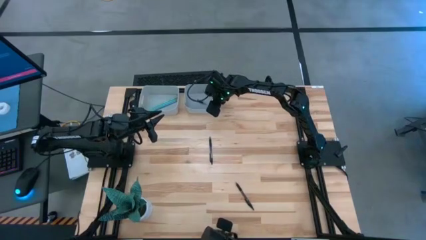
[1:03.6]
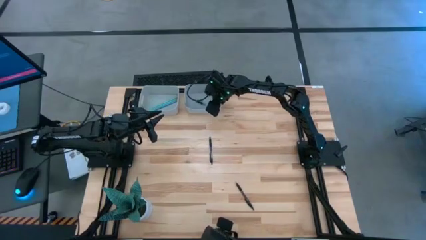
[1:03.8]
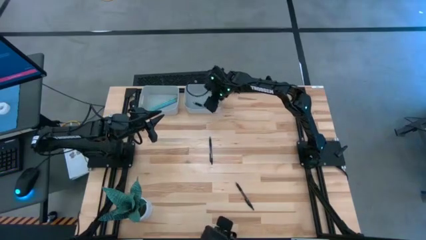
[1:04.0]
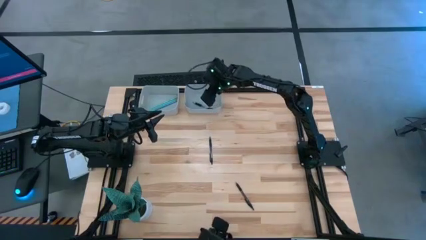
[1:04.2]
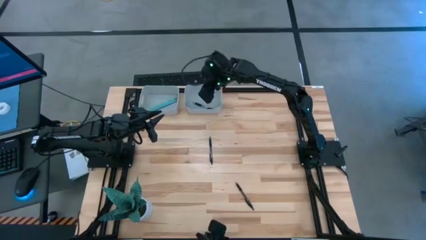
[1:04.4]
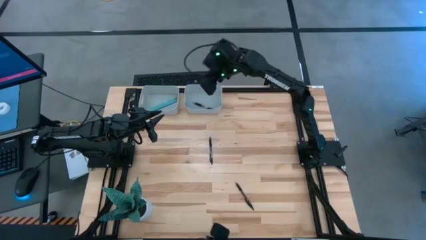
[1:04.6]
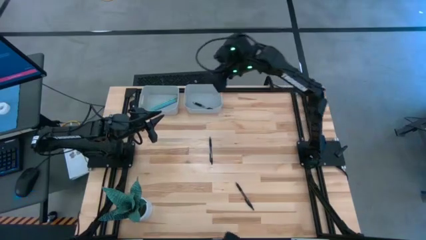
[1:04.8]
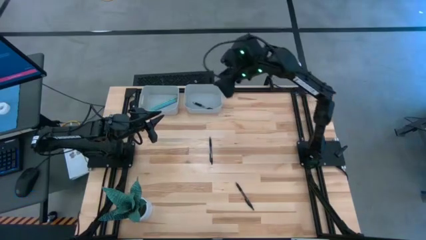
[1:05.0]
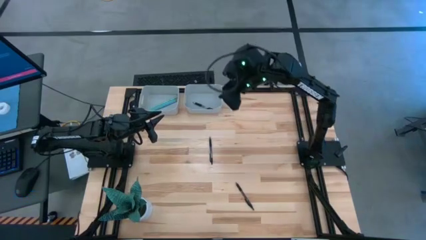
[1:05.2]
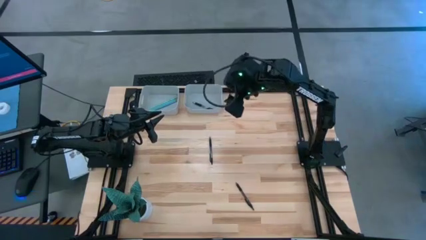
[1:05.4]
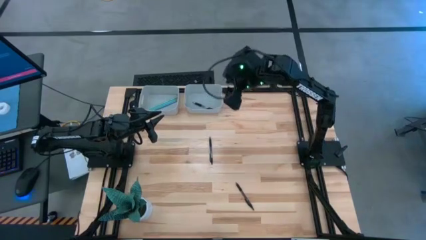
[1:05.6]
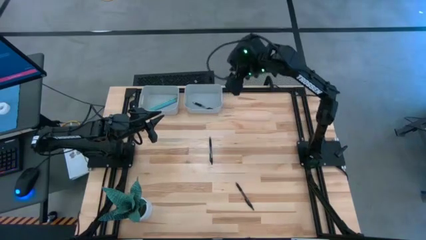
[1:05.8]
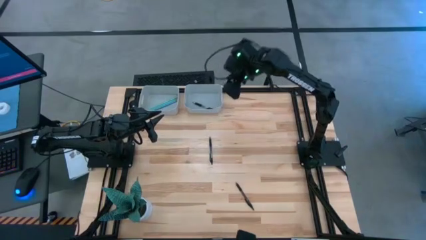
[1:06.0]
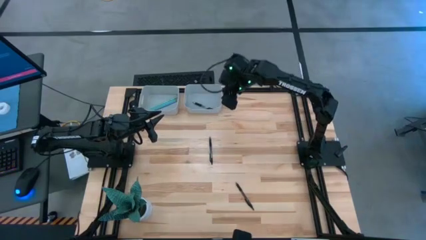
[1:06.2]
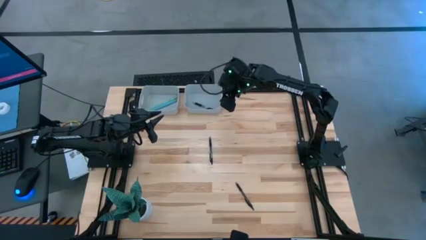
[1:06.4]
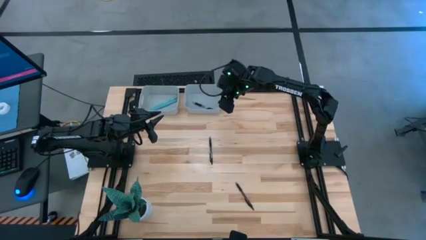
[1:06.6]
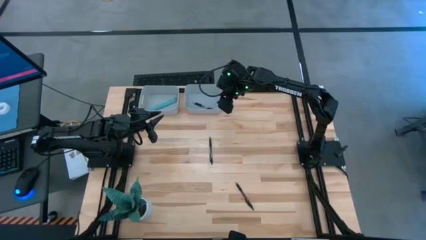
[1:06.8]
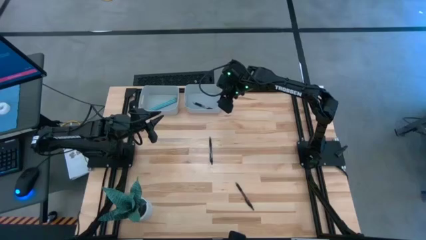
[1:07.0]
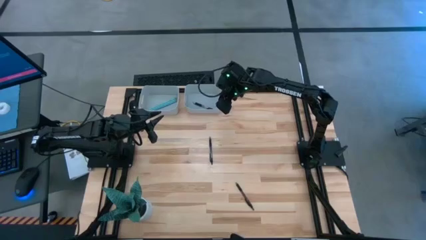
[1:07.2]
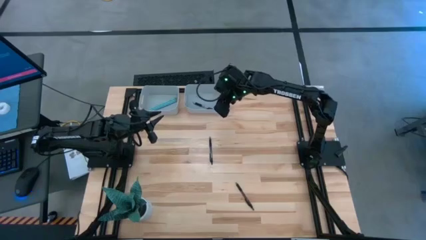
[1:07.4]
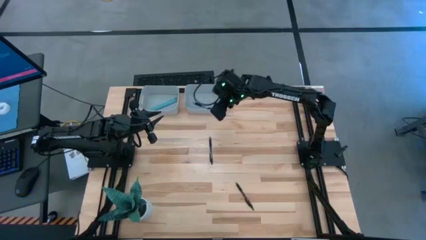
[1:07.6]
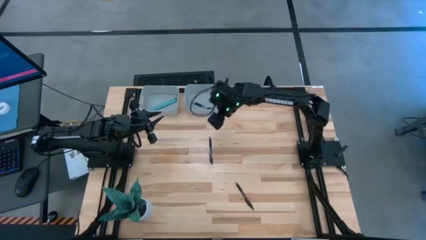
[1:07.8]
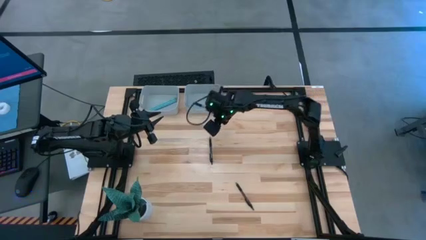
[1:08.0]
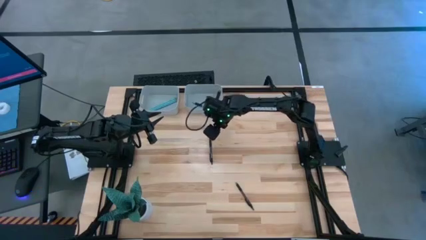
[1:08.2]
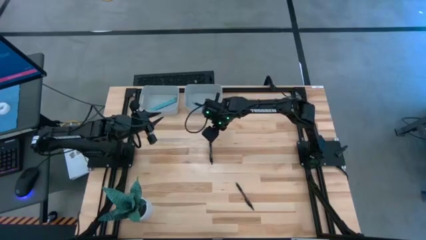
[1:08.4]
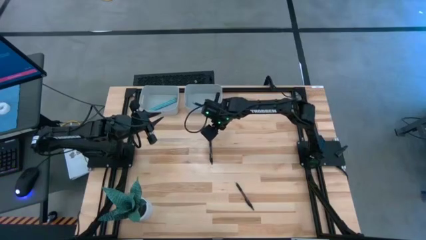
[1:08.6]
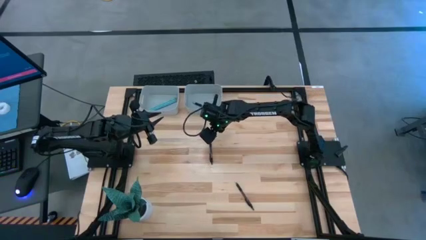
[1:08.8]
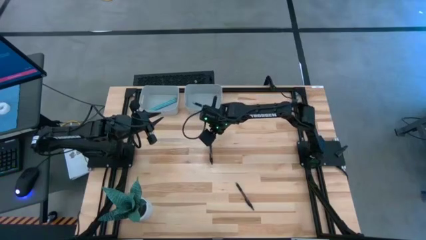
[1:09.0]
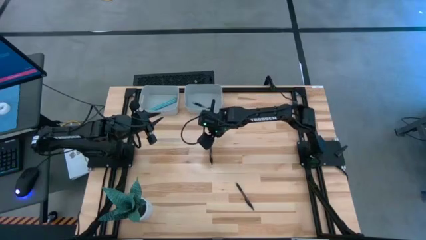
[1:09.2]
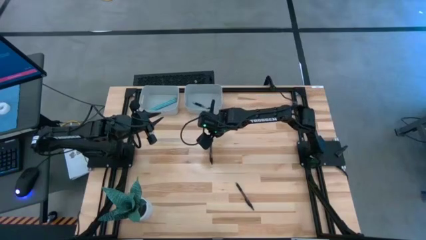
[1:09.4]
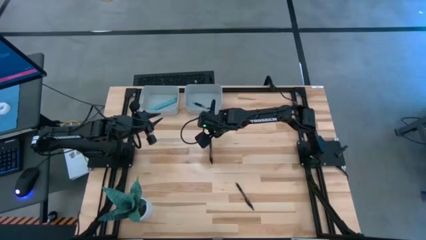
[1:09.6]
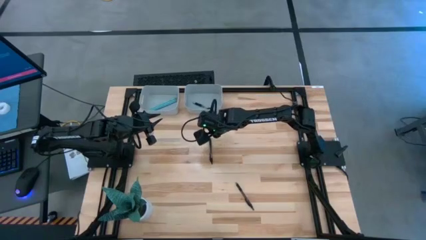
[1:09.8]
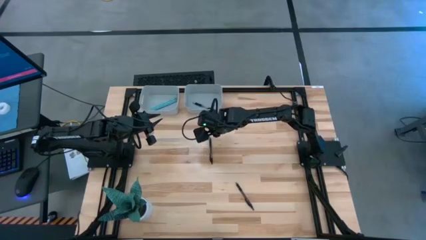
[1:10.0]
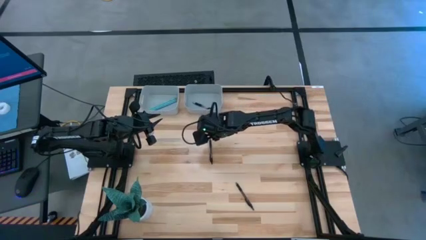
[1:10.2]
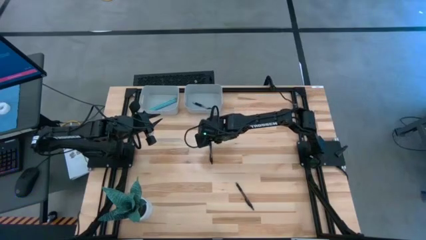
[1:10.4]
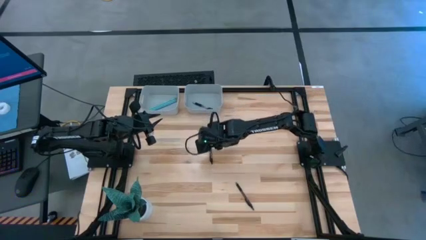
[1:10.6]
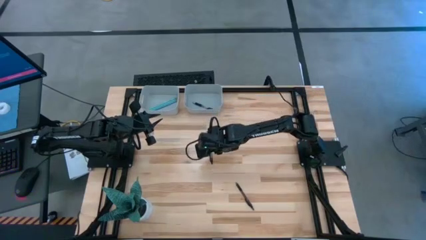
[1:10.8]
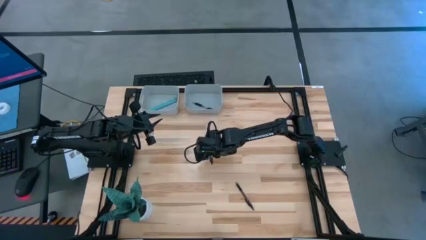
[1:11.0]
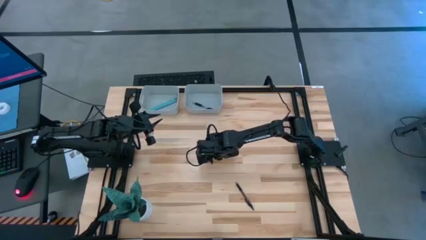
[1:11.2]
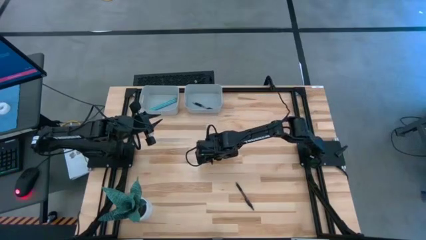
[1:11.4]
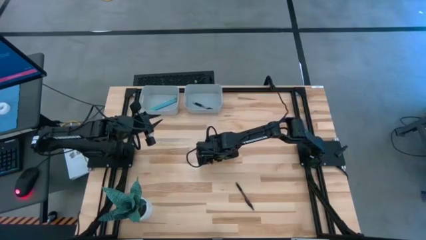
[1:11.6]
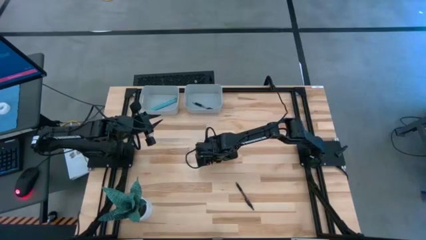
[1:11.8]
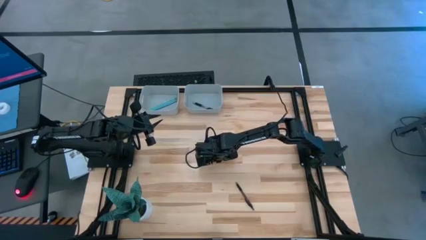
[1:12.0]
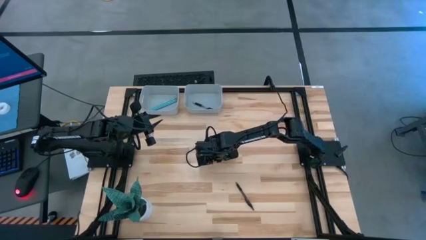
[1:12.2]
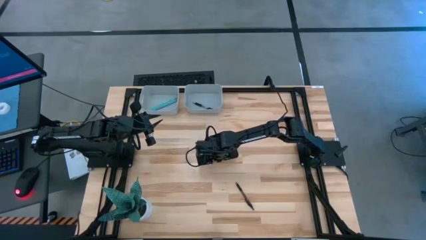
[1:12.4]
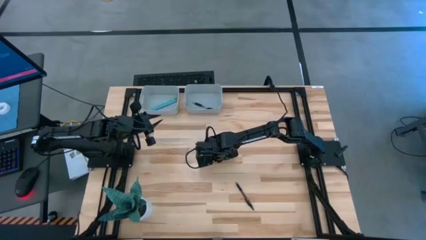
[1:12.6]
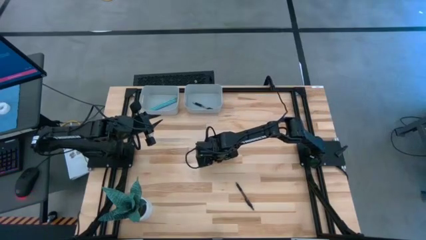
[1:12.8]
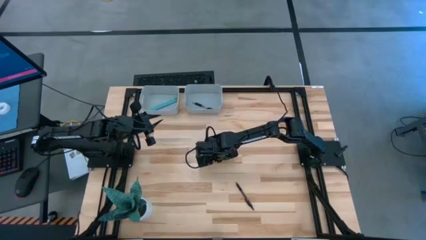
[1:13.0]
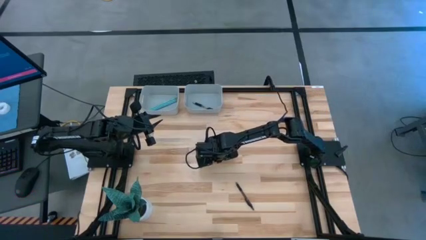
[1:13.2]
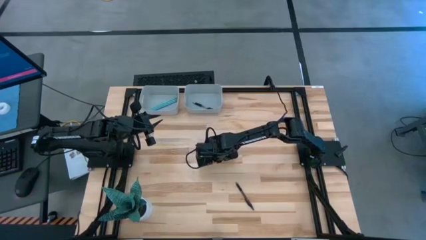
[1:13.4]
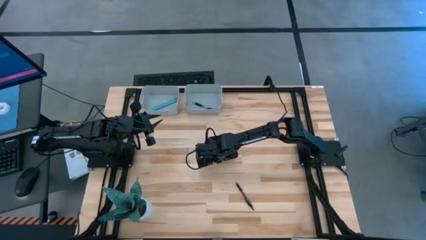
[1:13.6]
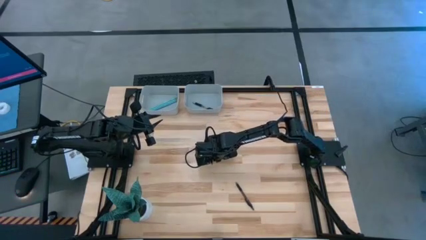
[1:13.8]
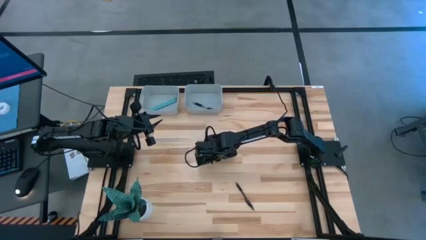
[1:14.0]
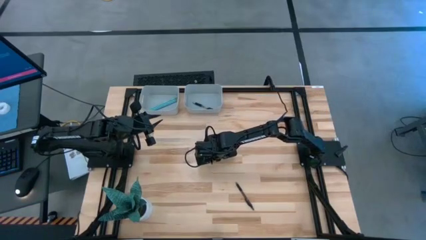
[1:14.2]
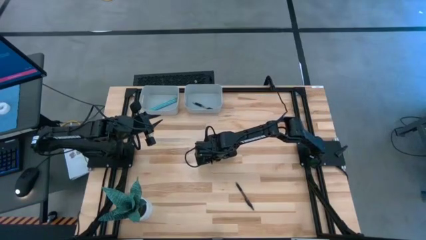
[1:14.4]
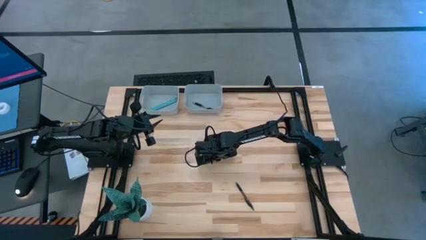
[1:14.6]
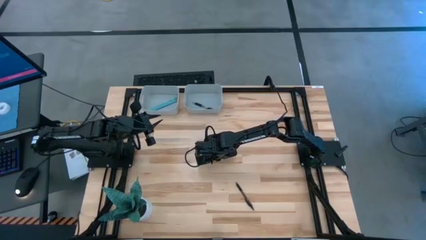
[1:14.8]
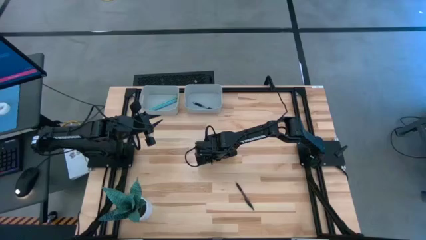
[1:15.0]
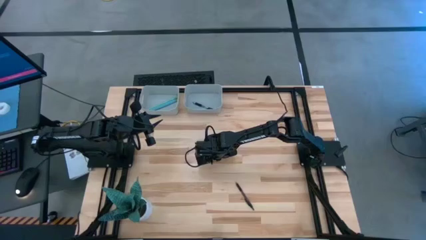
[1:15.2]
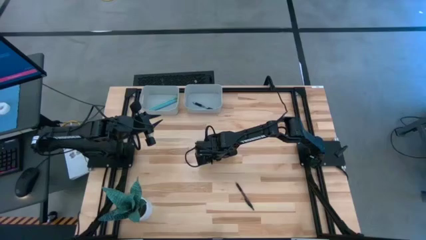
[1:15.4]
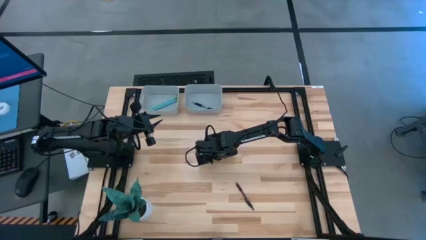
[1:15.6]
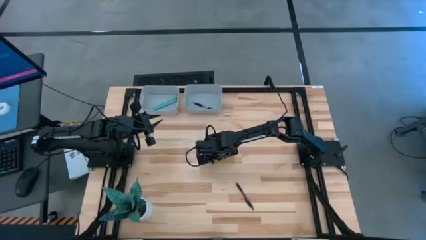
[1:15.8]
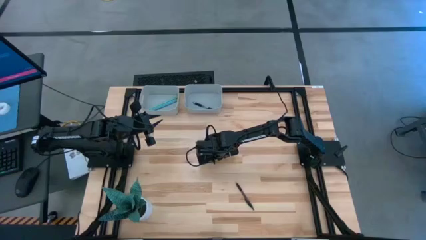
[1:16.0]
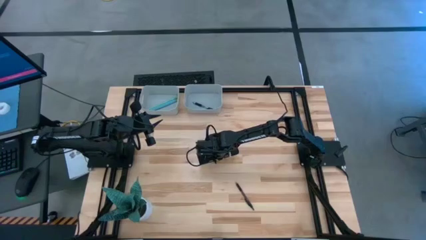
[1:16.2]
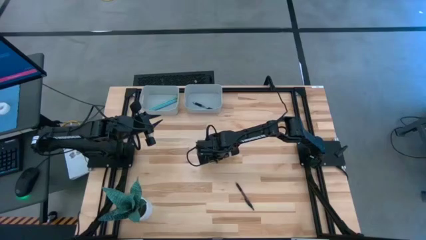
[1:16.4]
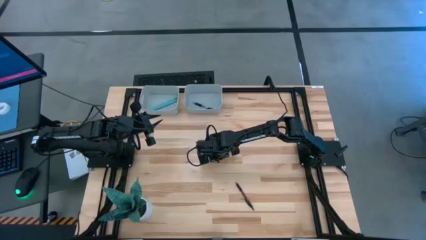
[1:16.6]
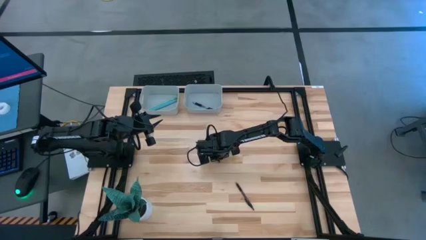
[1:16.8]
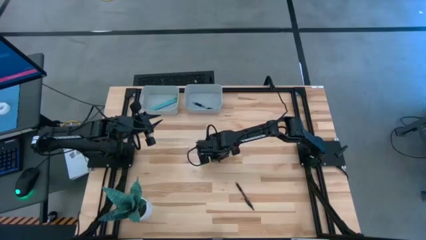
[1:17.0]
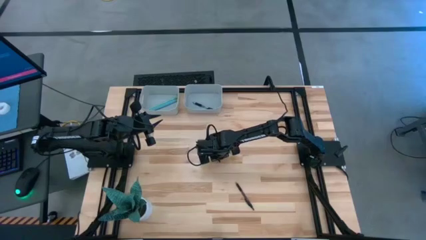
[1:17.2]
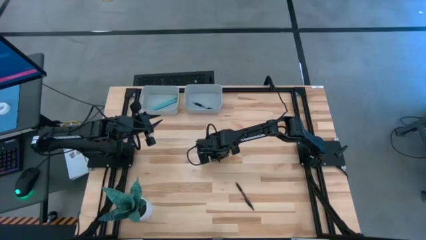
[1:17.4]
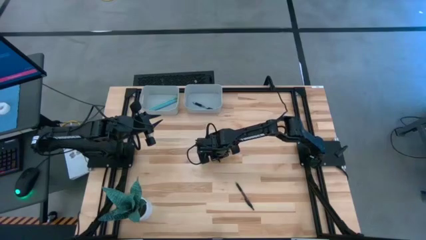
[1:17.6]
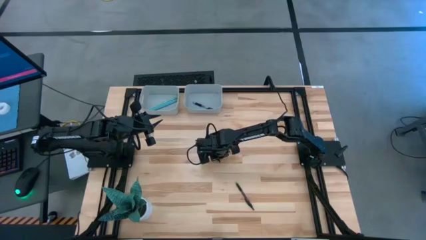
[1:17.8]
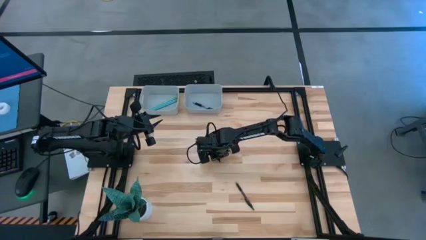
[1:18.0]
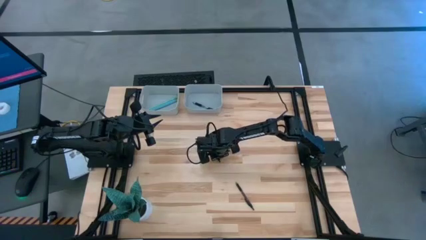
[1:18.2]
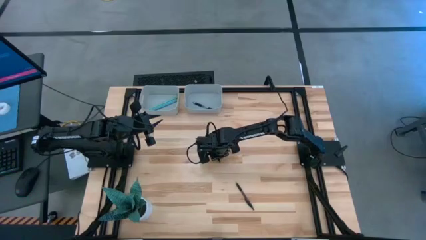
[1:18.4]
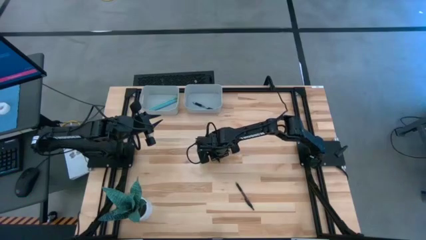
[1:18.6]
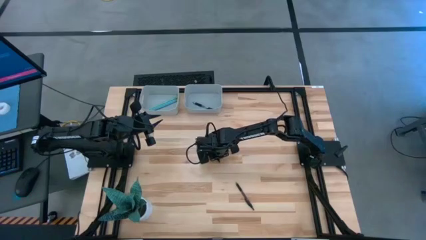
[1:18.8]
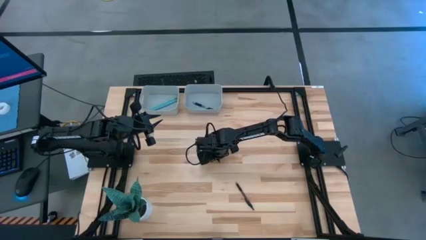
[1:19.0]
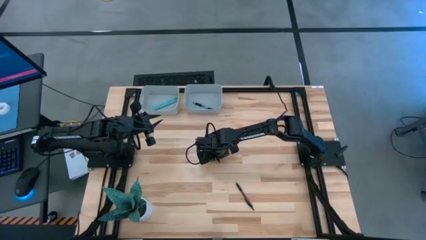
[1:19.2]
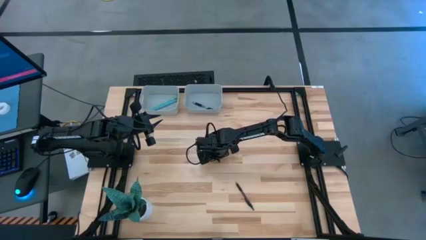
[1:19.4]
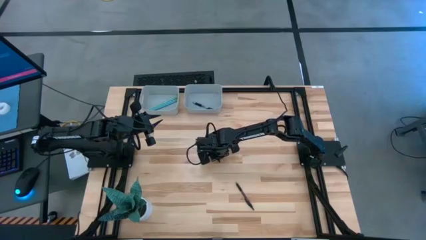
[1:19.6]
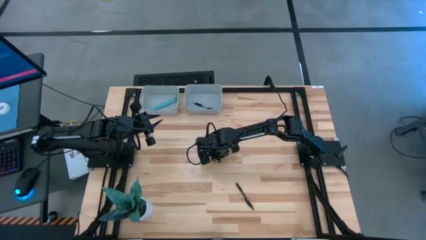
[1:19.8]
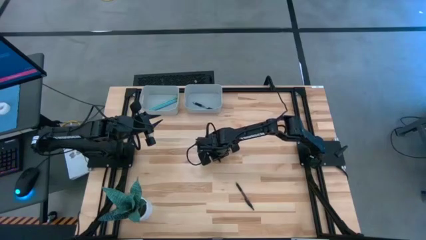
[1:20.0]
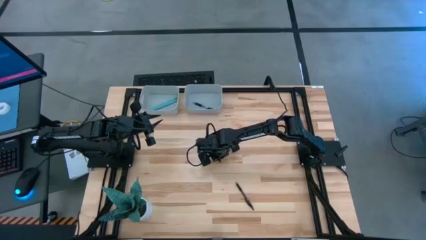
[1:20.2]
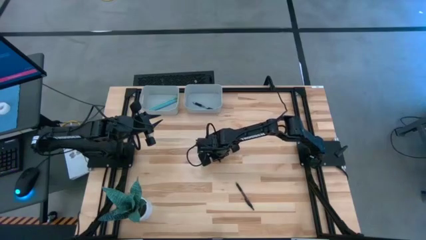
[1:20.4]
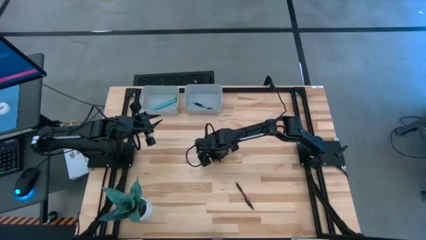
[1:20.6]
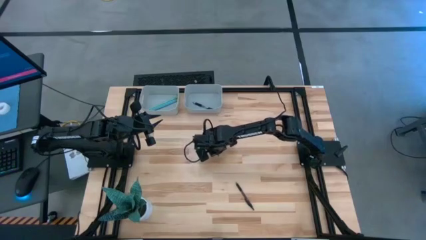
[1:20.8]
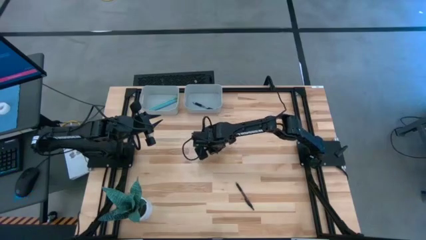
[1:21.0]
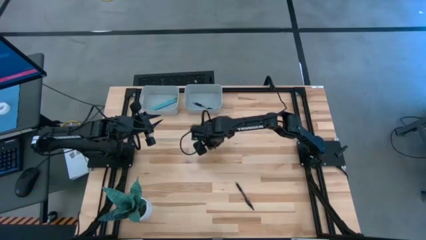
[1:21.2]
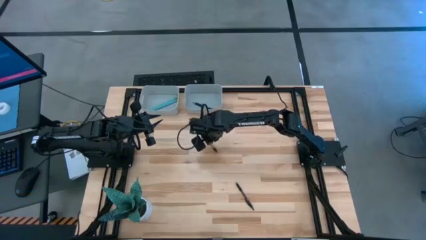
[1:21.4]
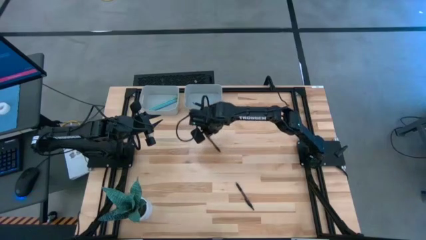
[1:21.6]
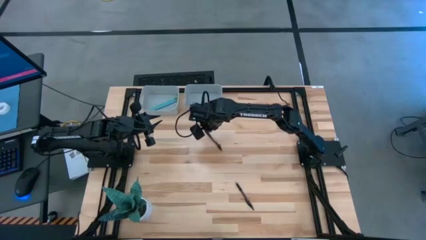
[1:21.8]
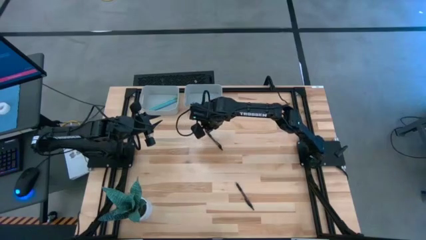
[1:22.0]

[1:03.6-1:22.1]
Task: Sort pens & pencils
Put the top black pen into the right gray bin
